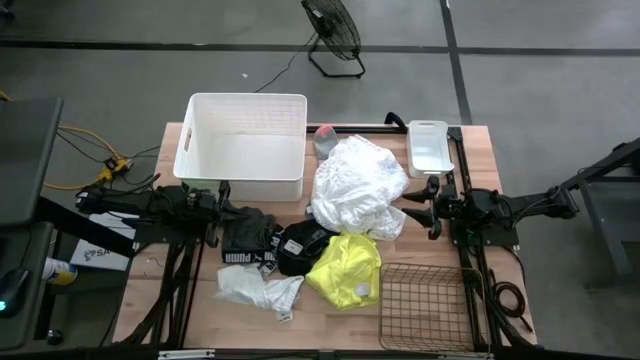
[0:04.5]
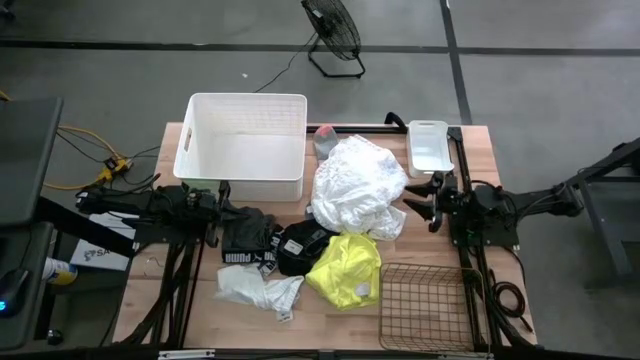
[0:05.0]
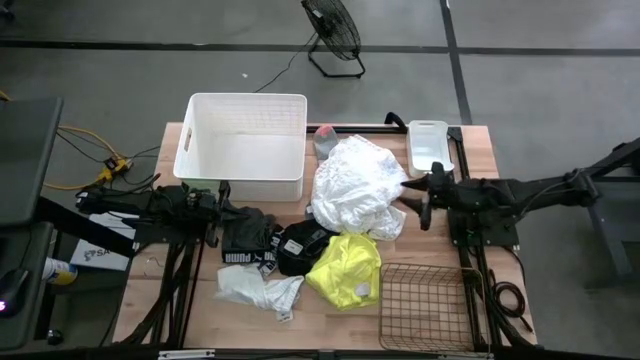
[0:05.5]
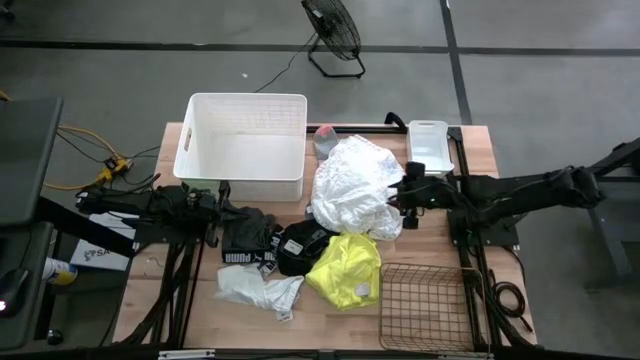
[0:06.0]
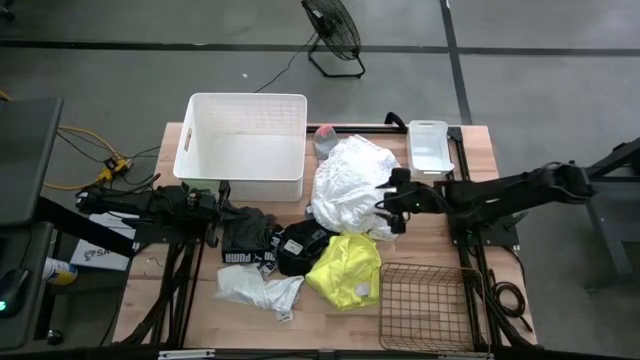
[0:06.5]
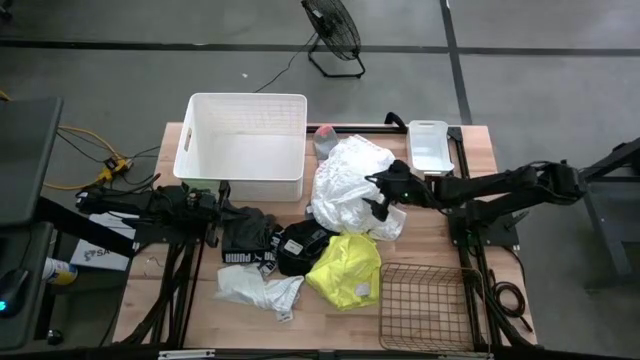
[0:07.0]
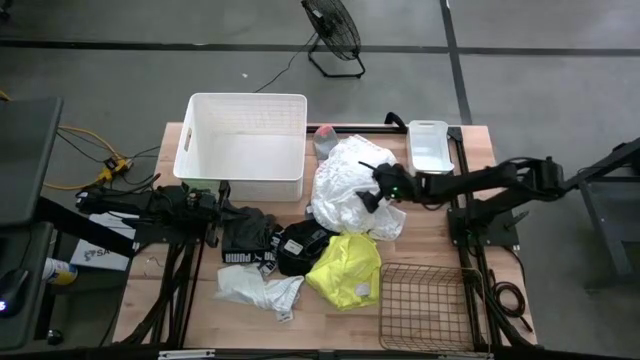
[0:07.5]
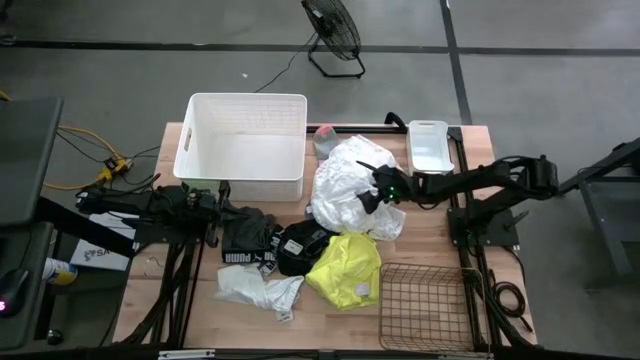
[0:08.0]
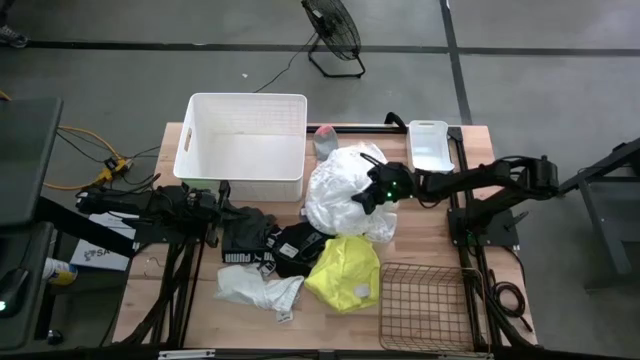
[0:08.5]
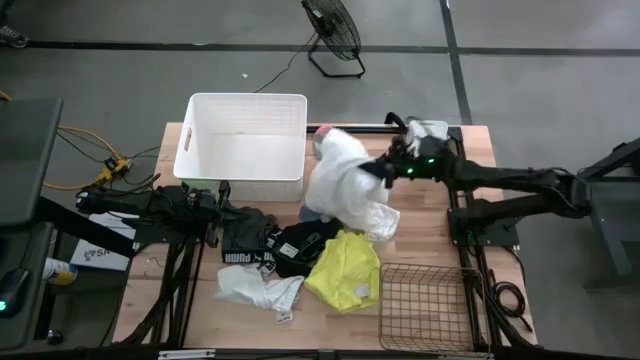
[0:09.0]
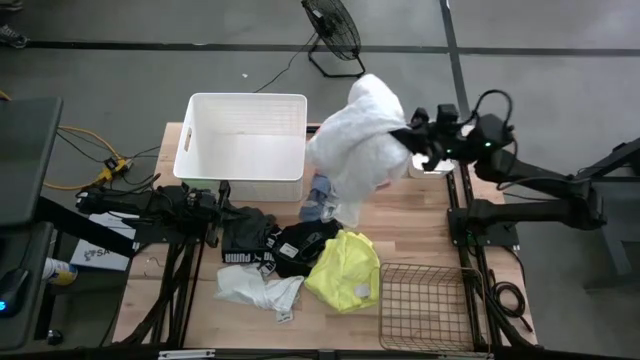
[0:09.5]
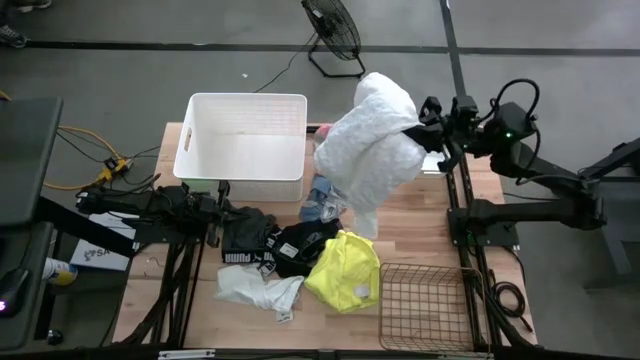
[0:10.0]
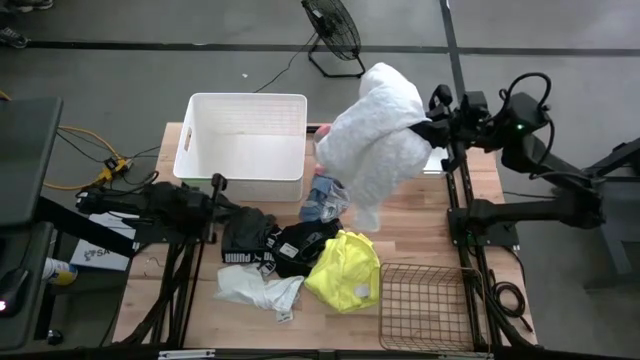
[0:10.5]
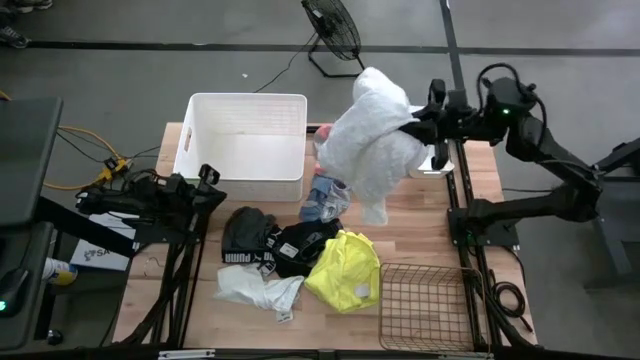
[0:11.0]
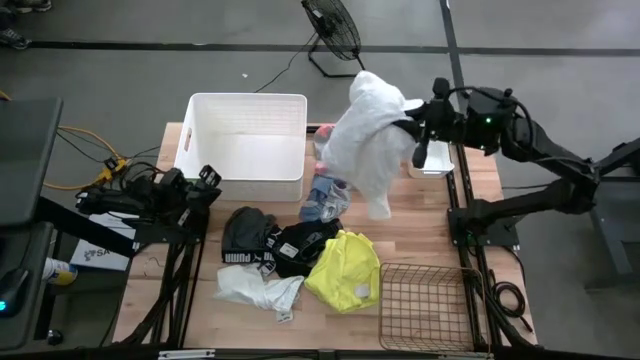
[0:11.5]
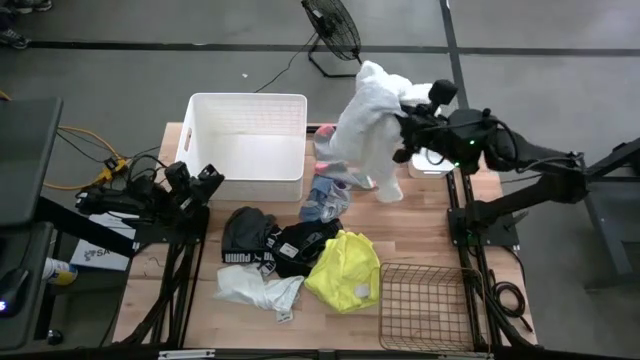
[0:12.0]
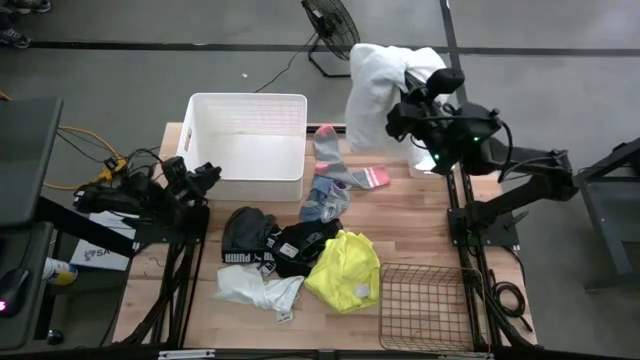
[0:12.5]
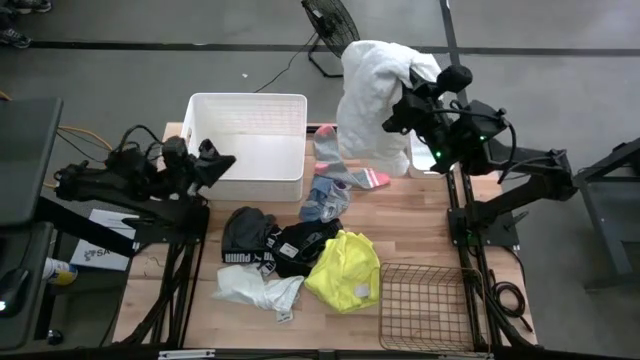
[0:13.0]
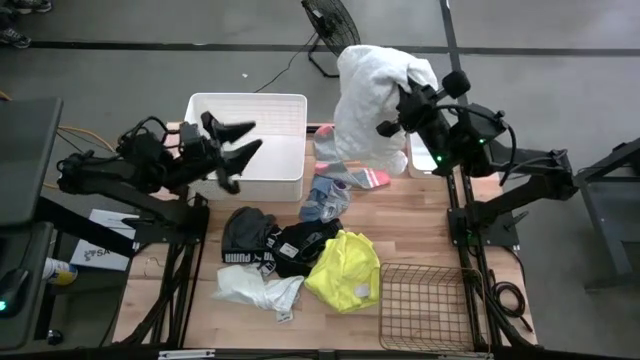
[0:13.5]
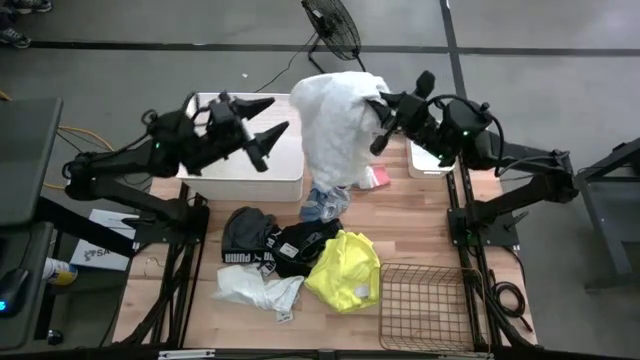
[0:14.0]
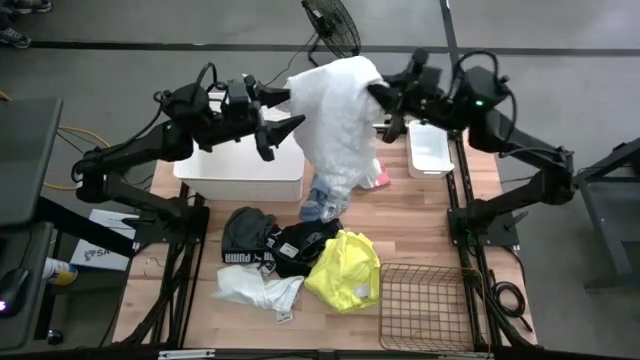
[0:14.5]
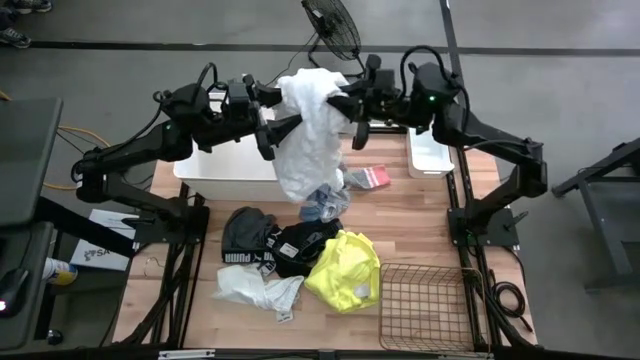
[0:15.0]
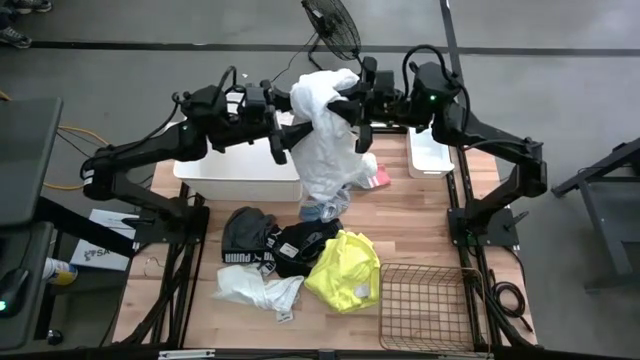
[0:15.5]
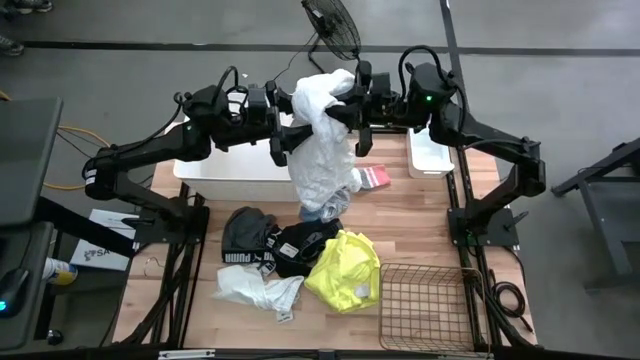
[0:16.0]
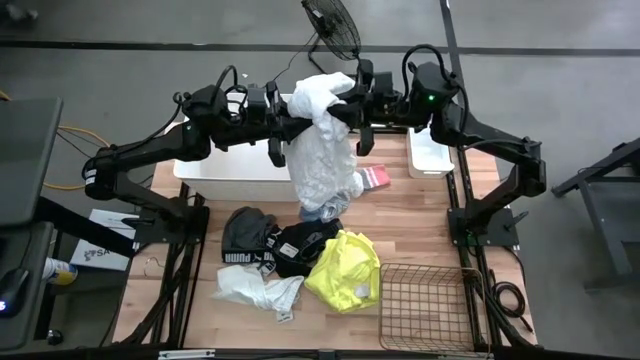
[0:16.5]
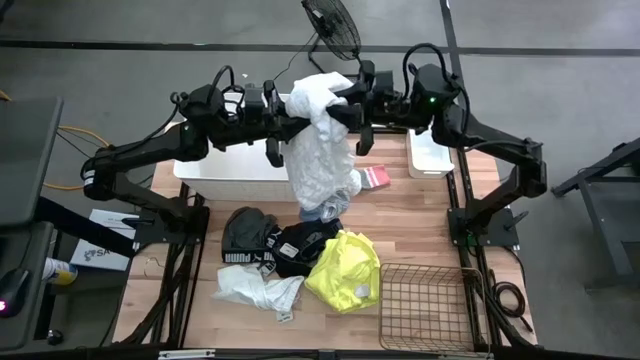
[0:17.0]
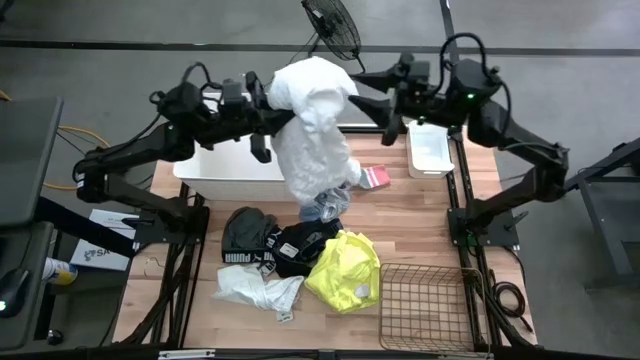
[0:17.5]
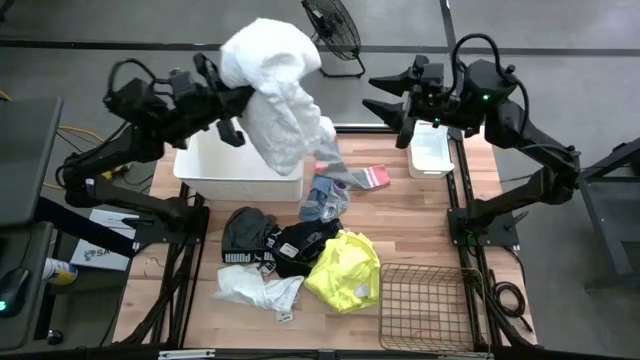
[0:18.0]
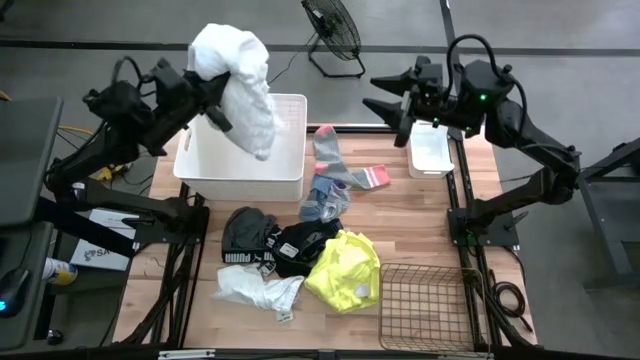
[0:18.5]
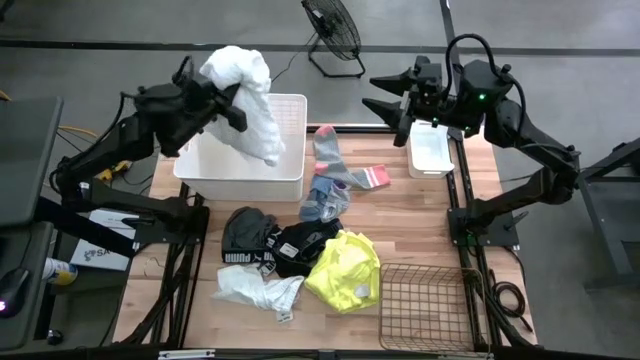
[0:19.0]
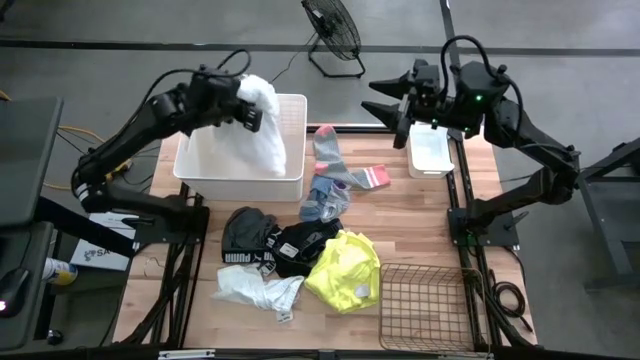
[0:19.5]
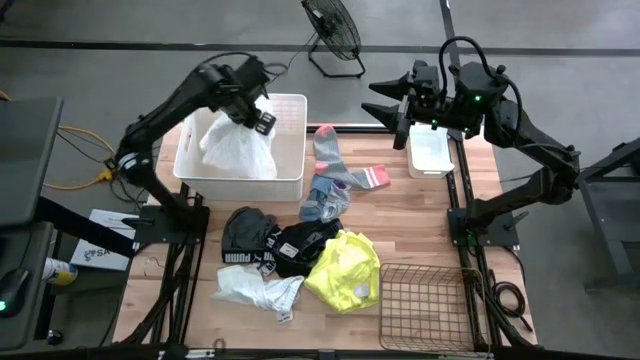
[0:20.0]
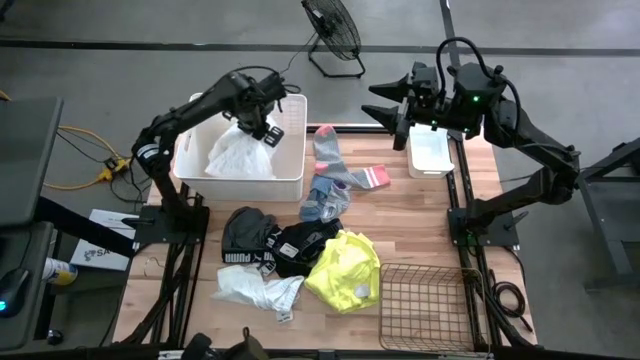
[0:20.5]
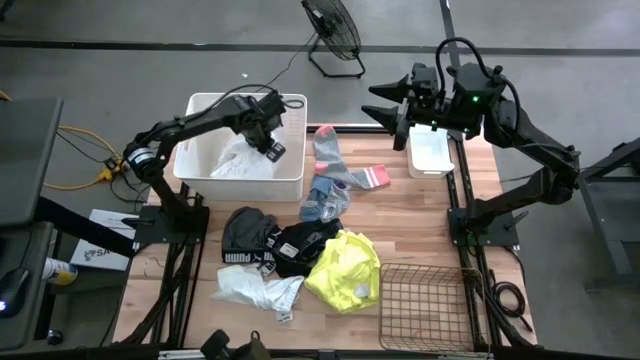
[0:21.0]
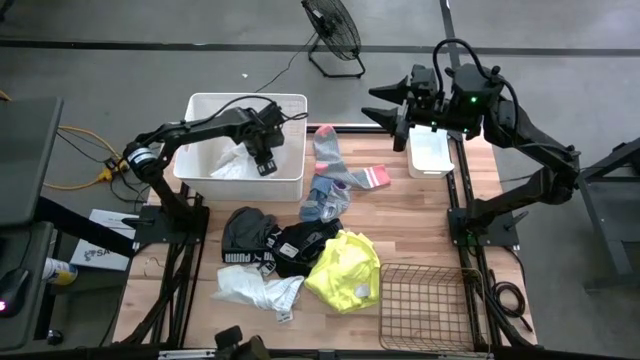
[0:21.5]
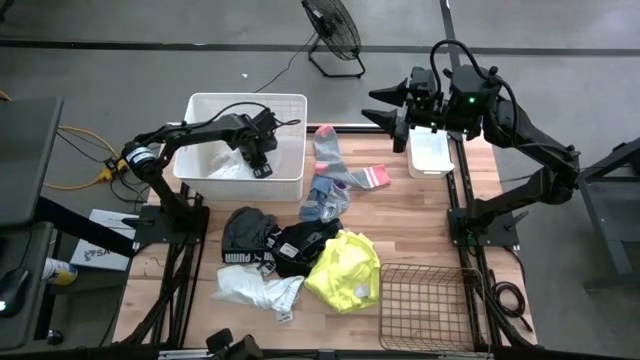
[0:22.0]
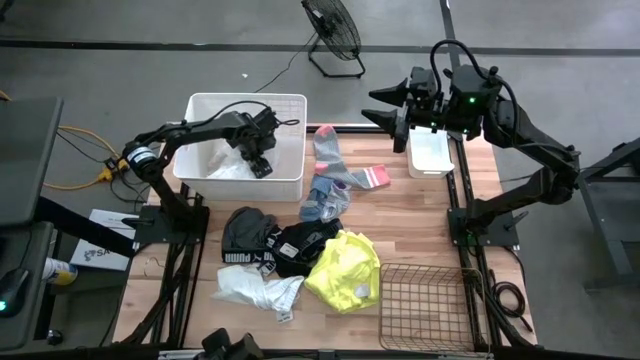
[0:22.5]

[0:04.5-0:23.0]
Task: Pick & Place Cloths
Put the white dress into the big white bin

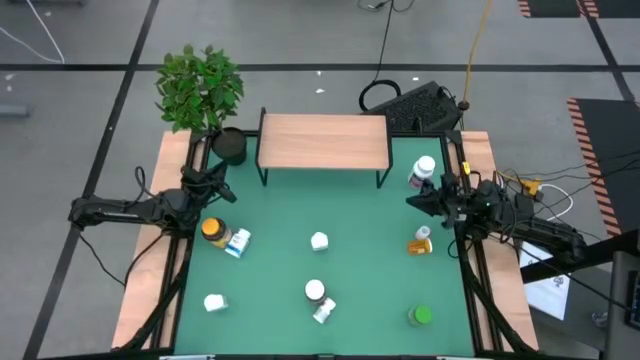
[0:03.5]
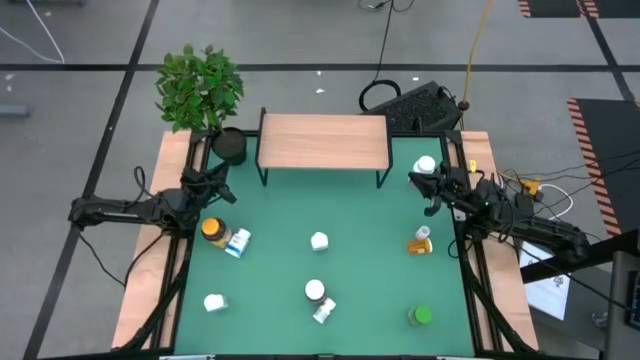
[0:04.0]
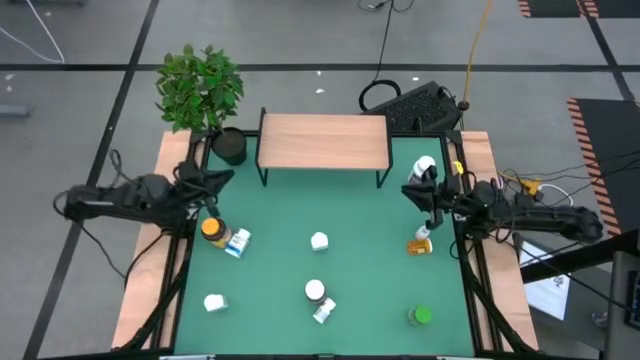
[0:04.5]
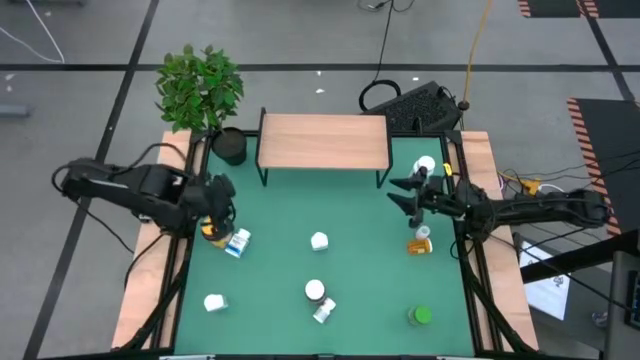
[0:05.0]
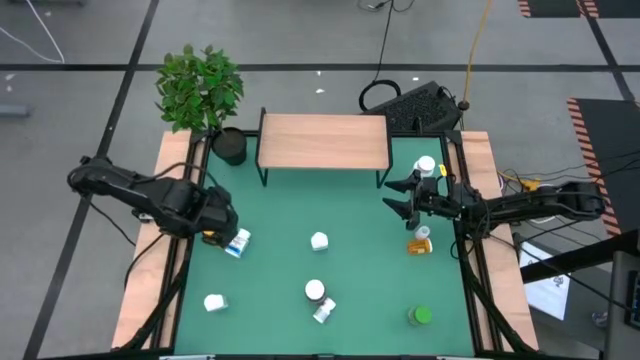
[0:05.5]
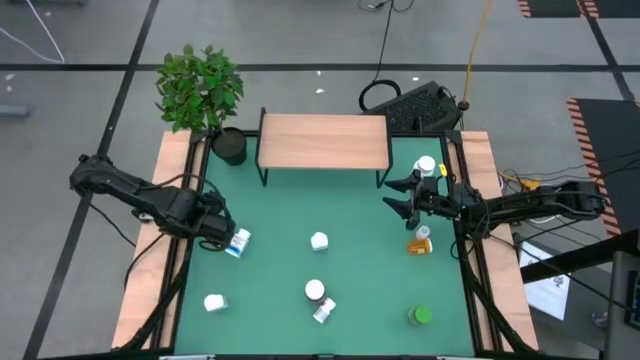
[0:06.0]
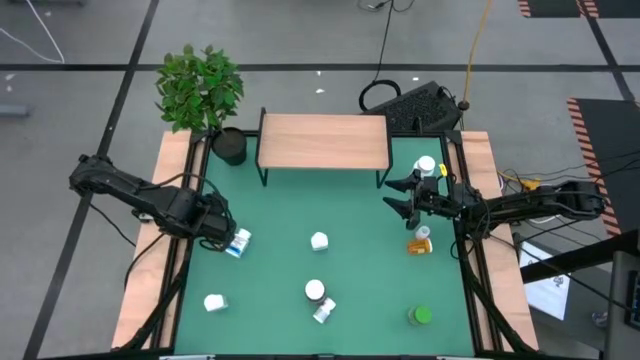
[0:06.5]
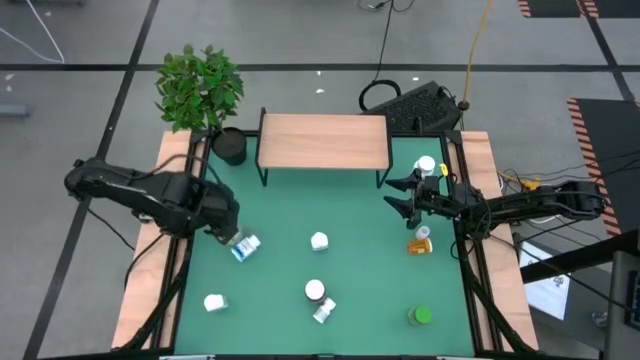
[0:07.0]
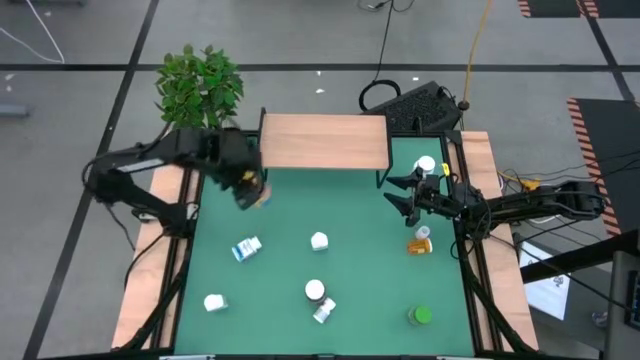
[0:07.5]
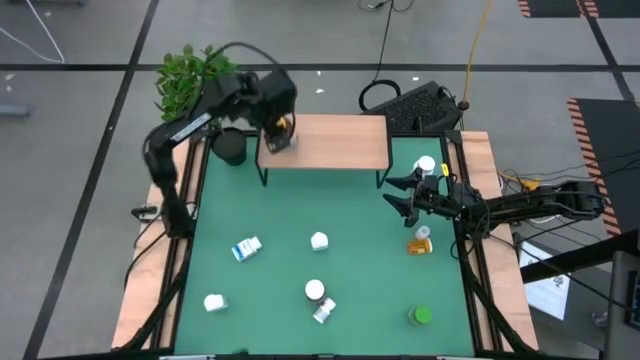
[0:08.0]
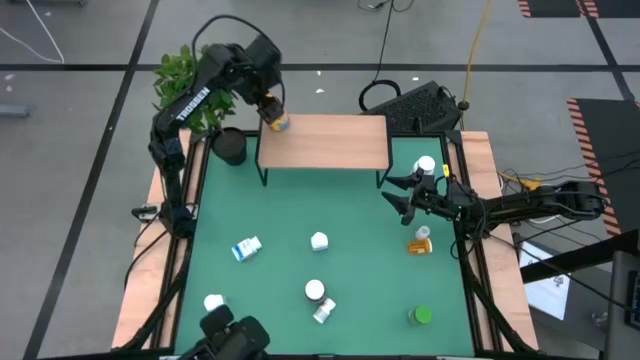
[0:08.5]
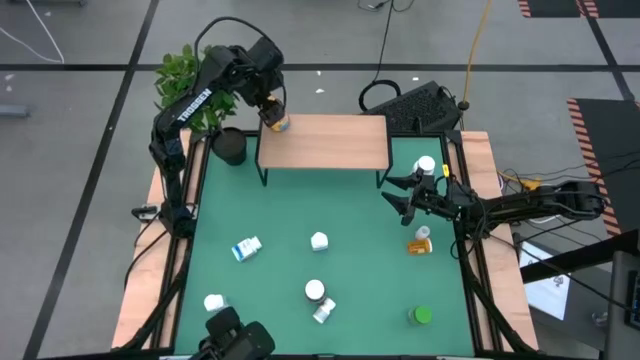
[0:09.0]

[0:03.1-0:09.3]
Task: Pick and place medicine bottles onto shelf by color
Put the yellow medicine bottle on the shelf
